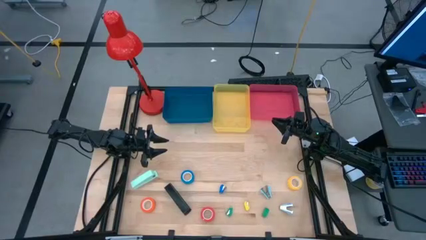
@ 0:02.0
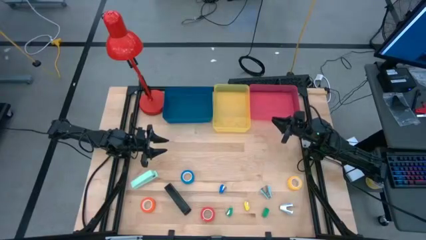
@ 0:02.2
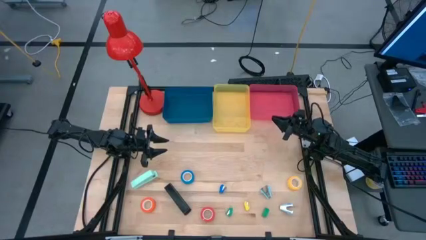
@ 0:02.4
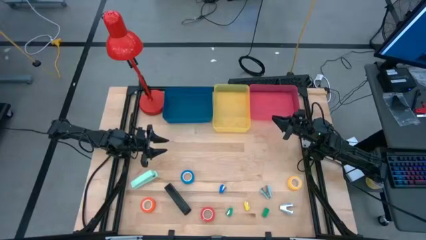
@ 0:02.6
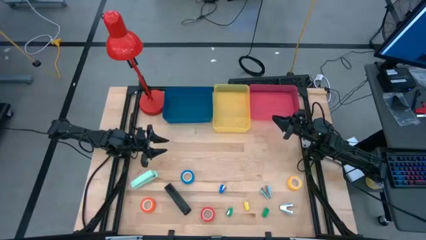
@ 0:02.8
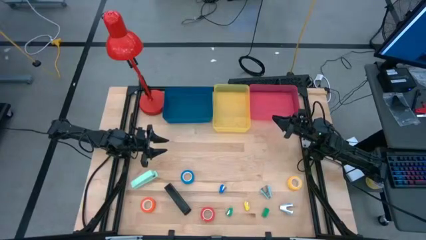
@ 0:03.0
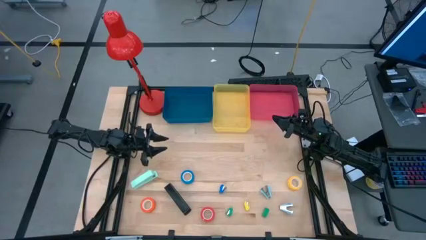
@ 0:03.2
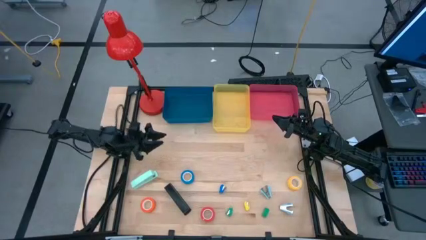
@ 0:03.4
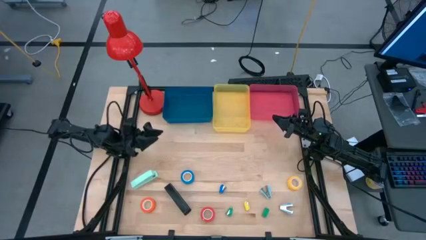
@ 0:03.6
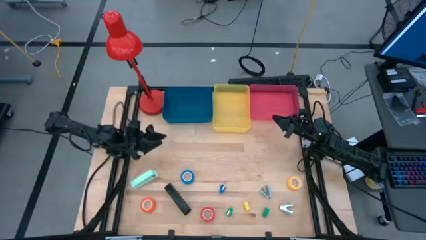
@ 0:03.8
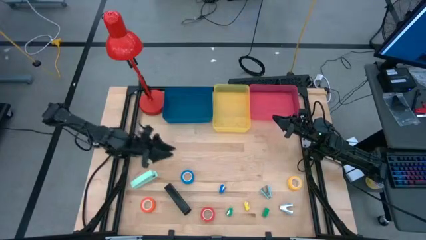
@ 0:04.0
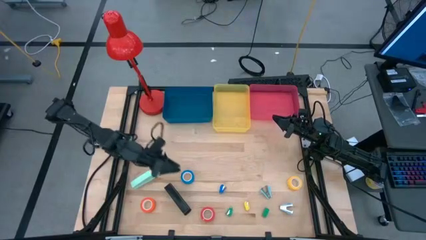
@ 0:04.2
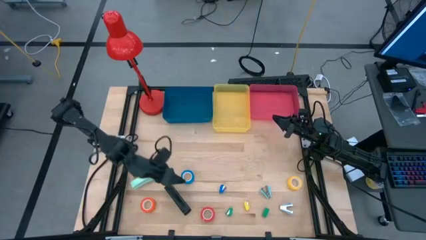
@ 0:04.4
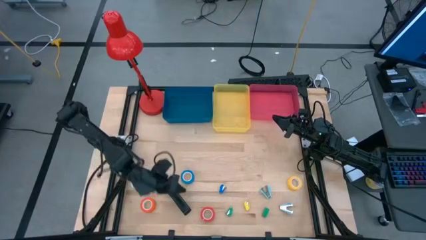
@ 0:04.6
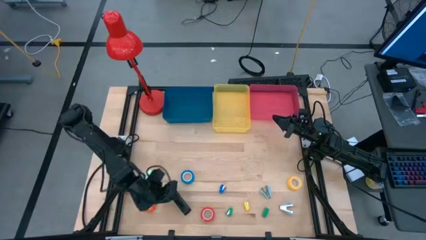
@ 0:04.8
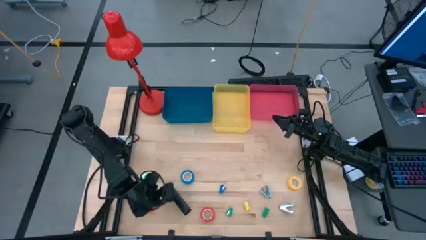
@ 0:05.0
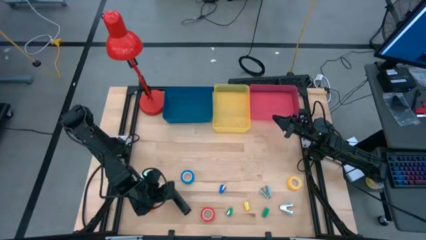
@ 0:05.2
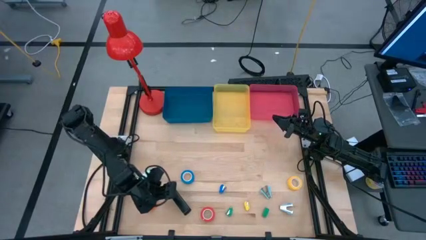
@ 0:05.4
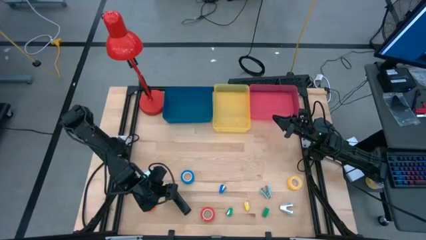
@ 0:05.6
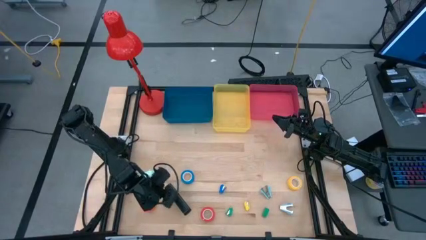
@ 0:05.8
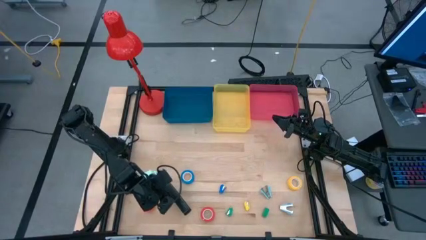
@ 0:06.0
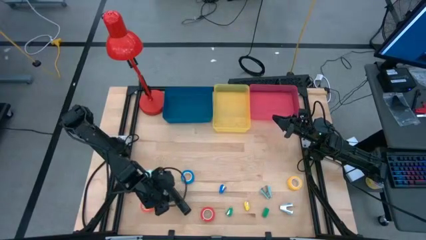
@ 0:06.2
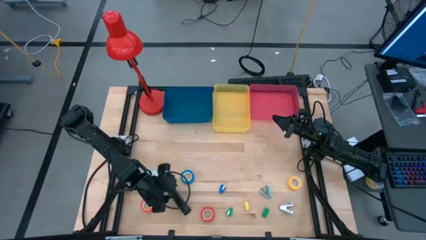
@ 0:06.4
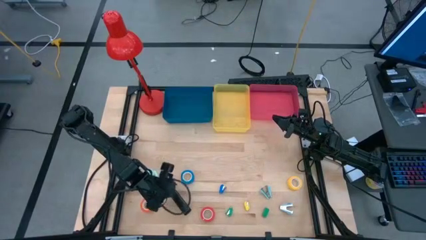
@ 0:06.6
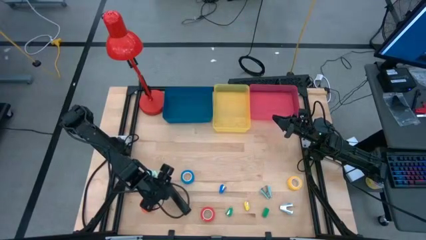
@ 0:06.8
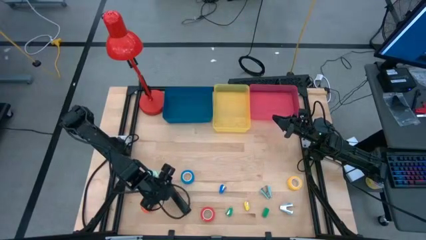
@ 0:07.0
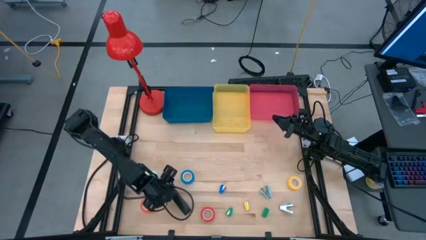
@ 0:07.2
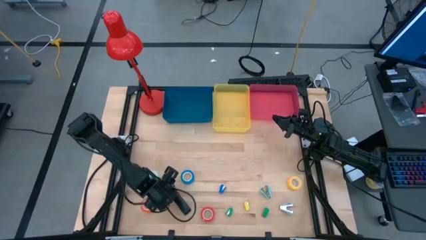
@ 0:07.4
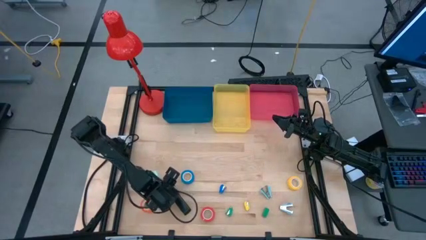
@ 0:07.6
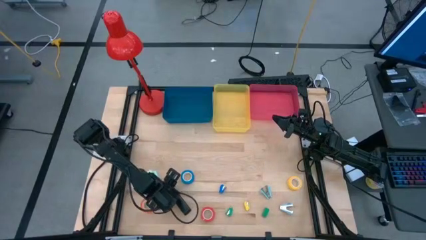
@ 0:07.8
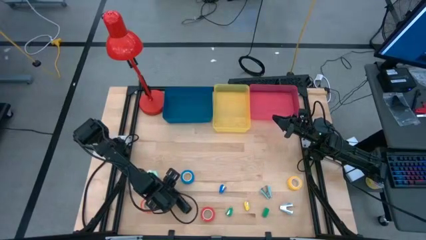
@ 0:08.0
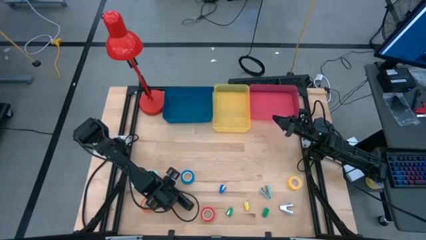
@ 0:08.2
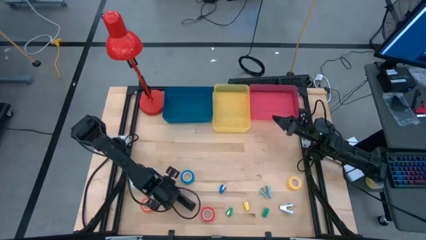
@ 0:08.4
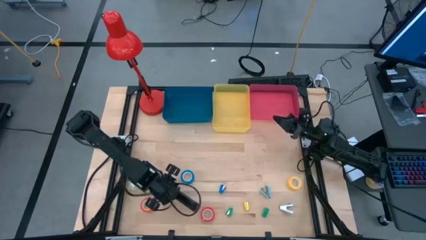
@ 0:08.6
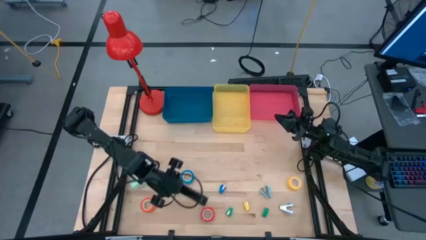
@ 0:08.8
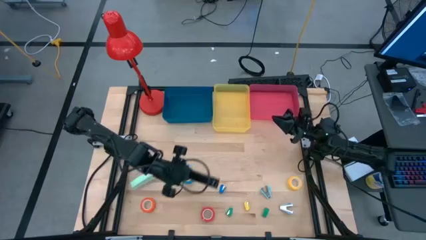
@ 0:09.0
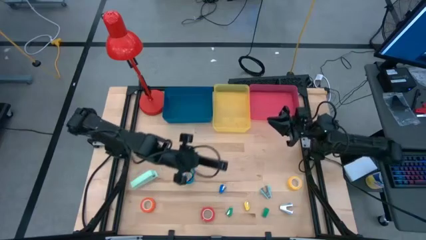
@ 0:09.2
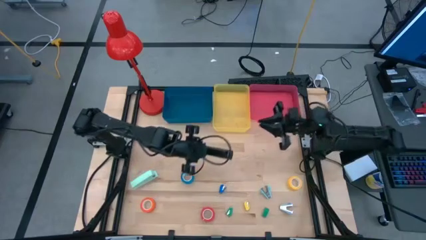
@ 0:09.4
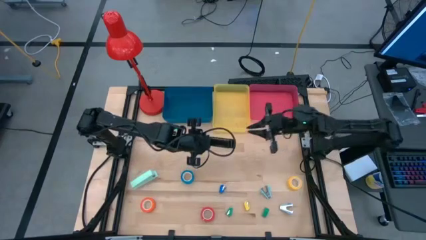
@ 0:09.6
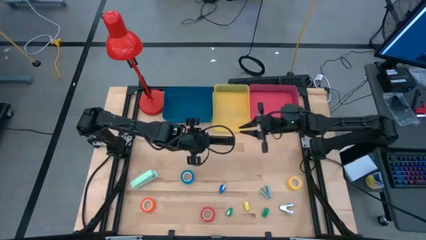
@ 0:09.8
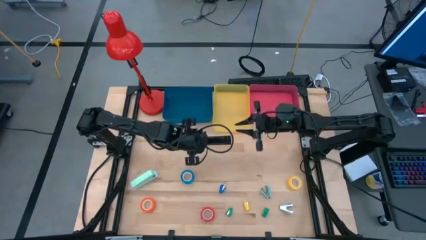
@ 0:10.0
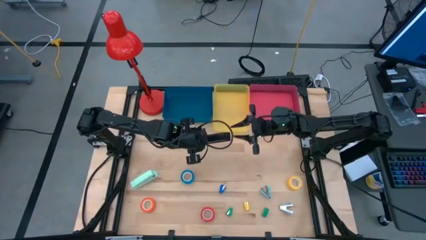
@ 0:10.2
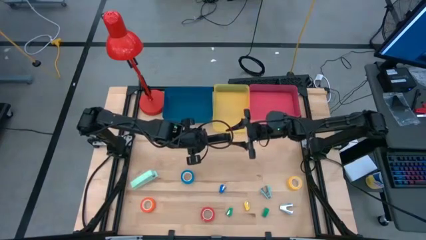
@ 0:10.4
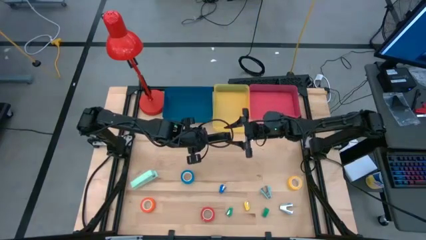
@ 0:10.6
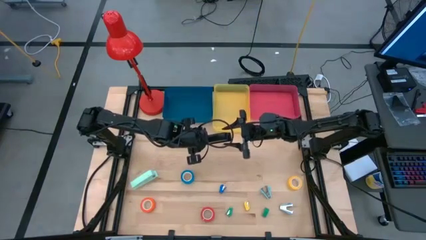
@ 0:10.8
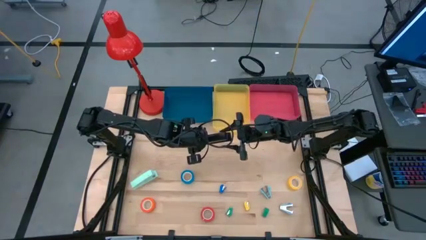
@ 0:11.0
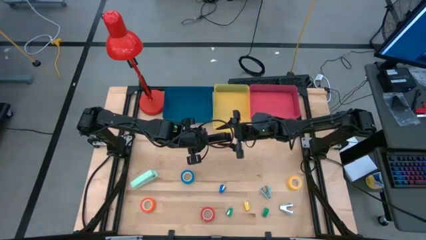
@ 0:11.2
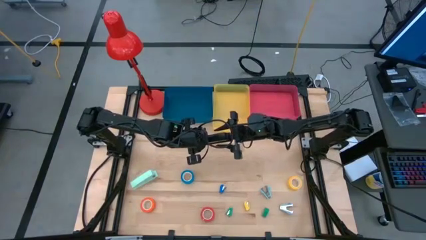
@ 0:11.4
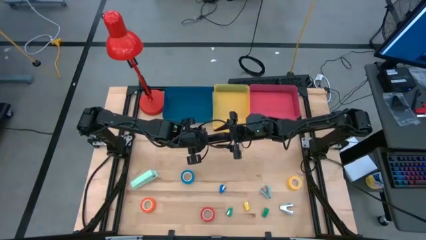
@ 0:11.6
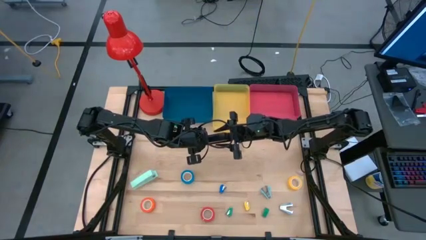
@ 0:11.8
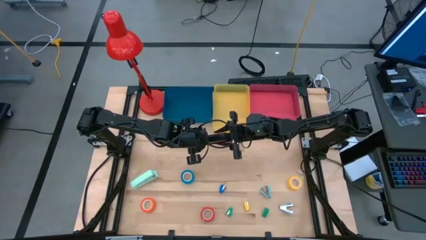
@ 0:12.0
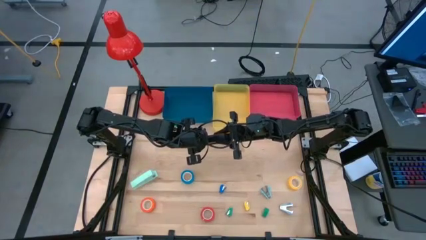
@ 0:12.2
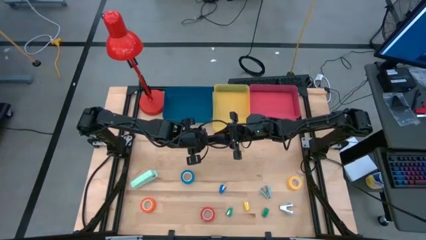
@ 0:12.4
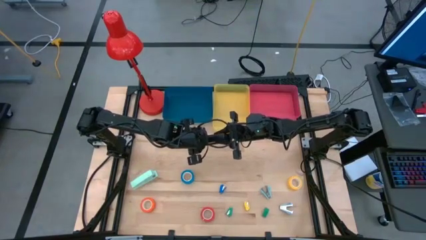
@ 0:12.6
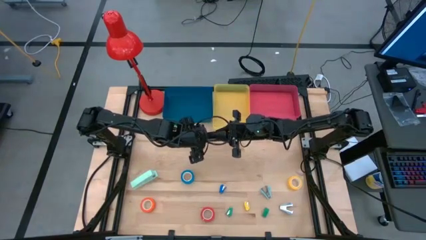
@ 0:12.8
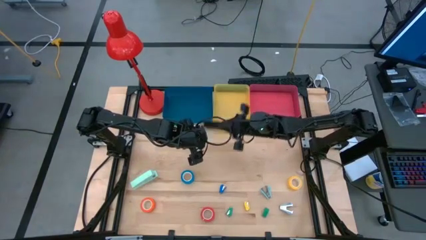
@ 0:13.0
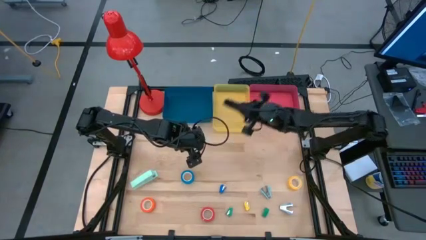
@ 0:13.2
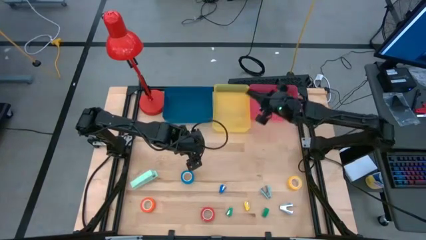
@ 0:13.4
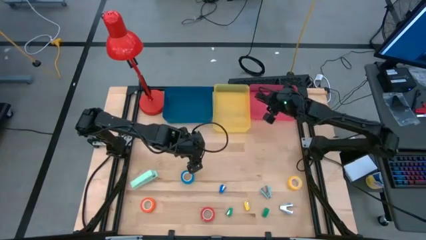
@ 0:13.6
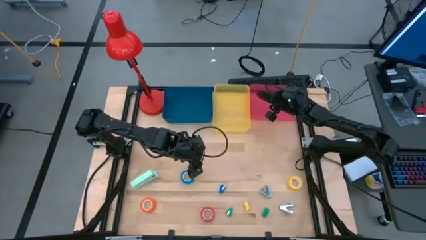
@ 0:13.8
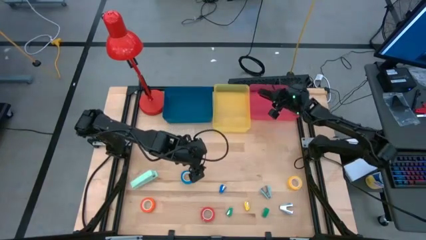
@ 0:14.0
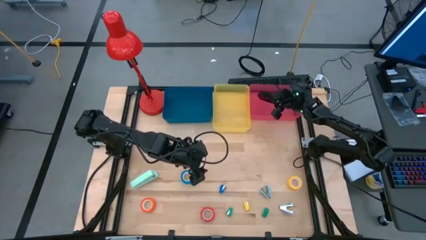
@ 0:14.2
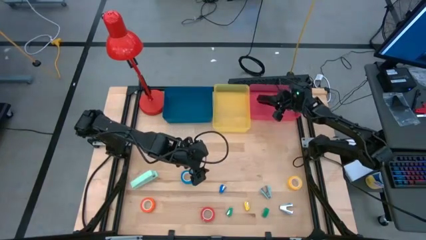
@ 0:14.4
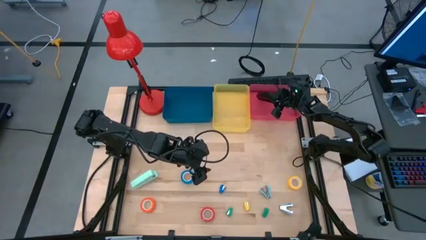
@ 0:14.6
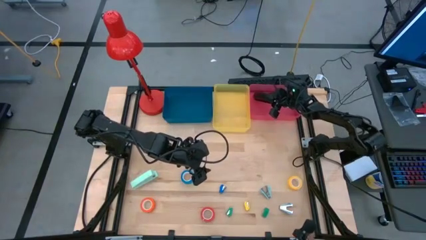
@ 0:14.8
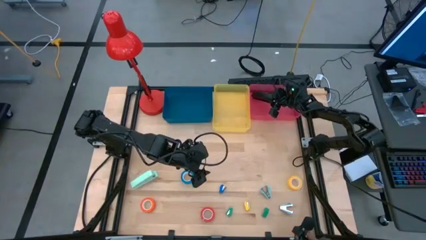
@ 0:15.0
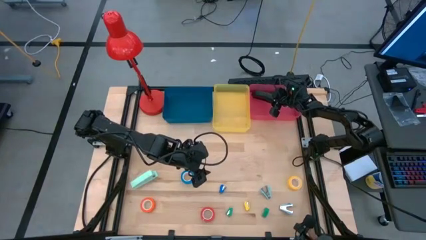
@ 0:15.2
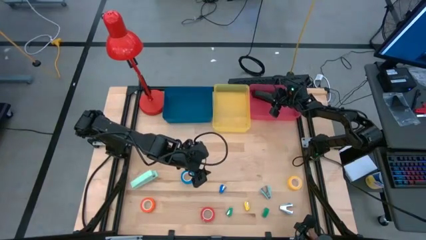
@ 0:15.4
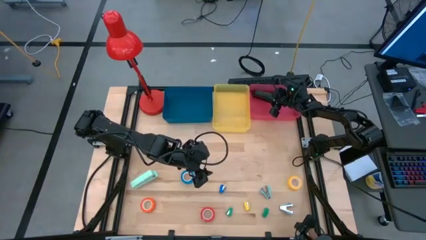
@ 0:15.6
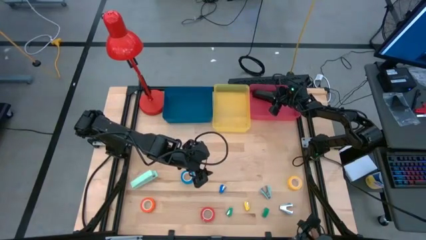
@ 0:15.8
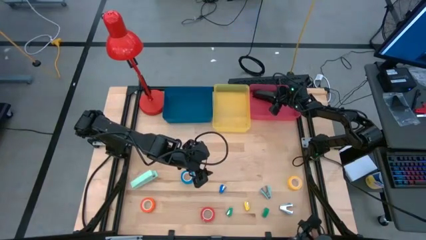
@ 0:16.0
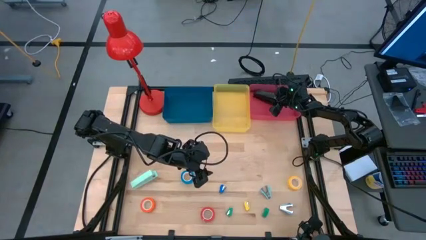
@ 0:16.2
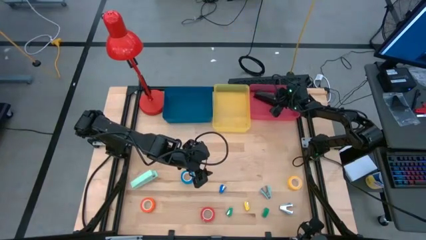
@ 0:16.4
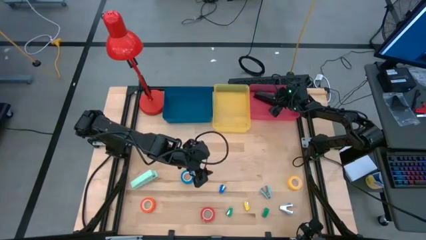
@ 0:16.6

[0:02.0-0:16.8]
Task: Pick and place Stapler, Stapler remover, tape
Put the black stapler into the pink bin
